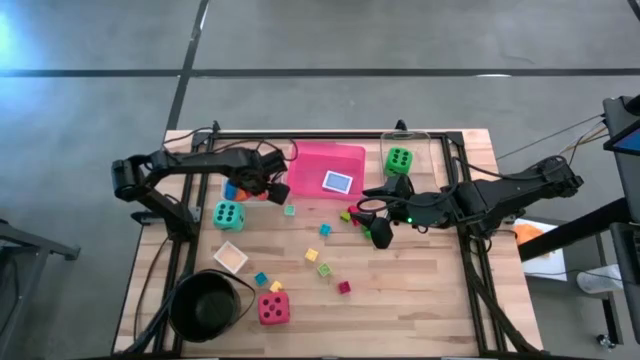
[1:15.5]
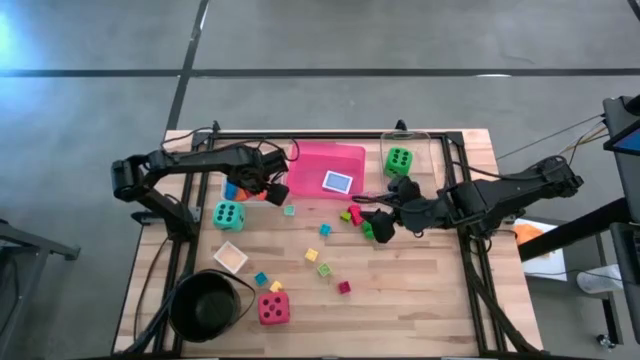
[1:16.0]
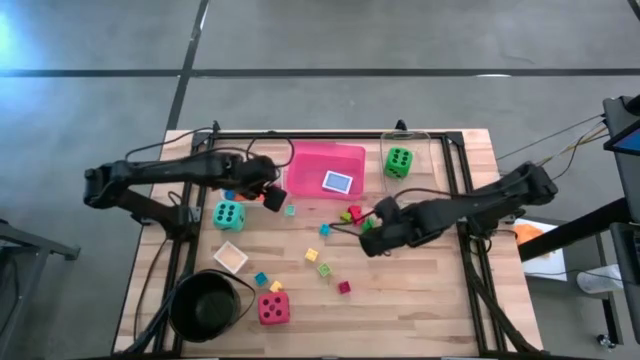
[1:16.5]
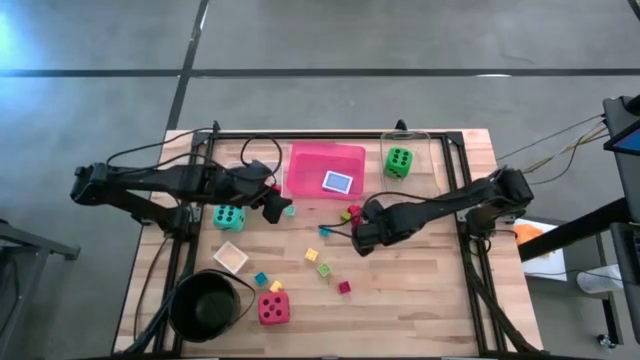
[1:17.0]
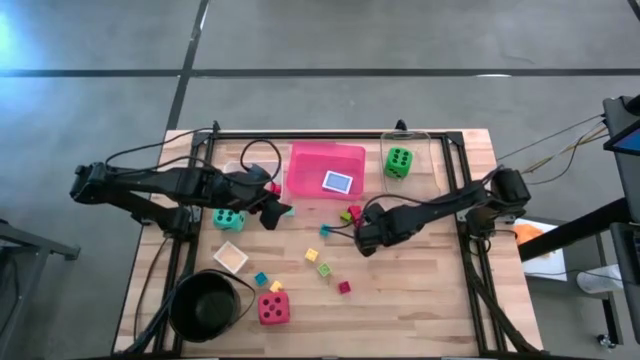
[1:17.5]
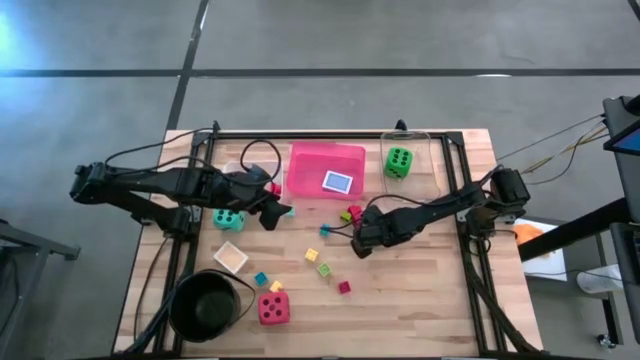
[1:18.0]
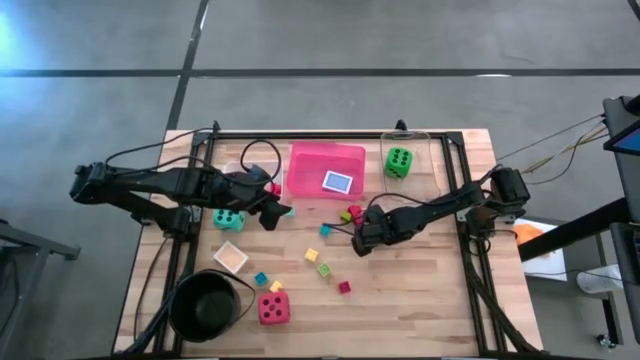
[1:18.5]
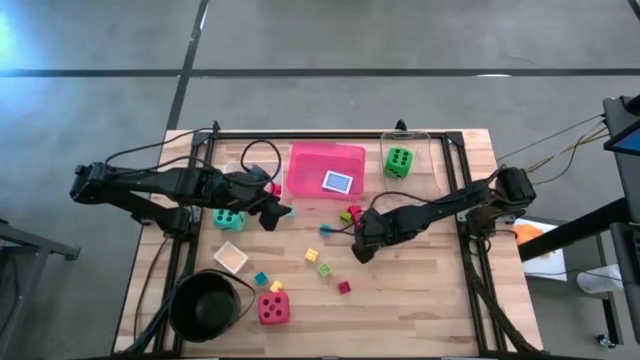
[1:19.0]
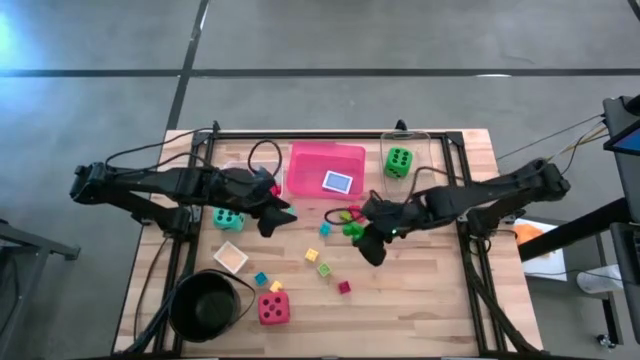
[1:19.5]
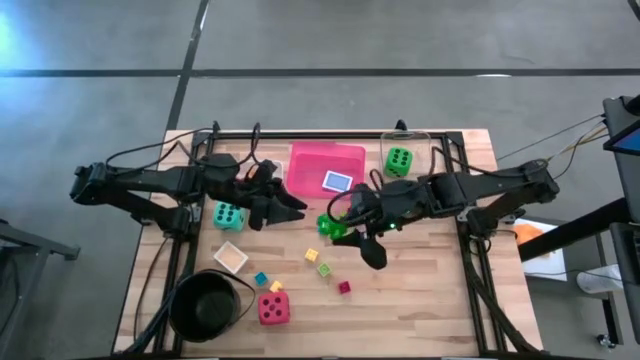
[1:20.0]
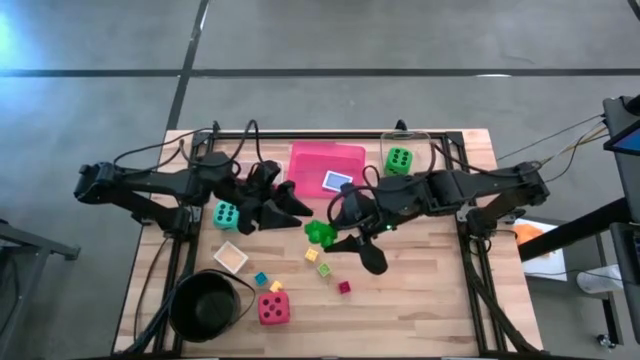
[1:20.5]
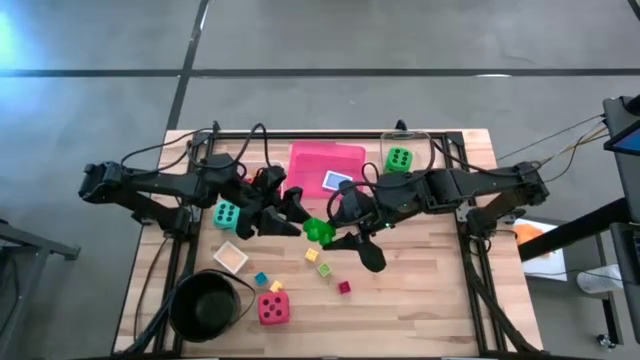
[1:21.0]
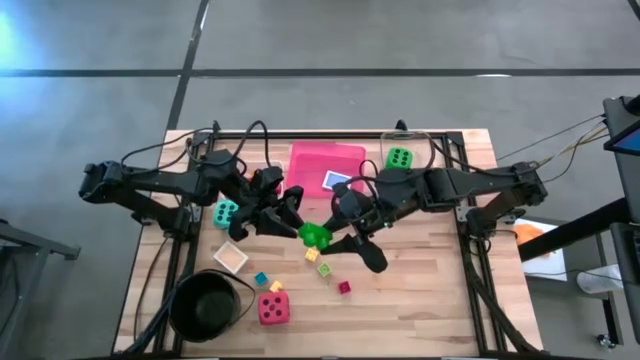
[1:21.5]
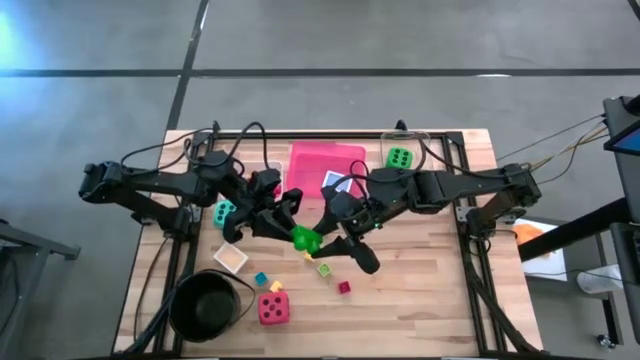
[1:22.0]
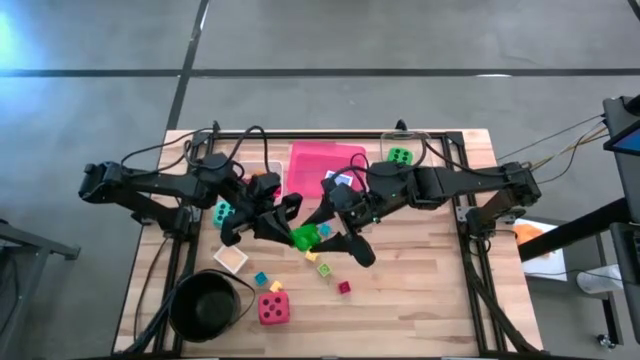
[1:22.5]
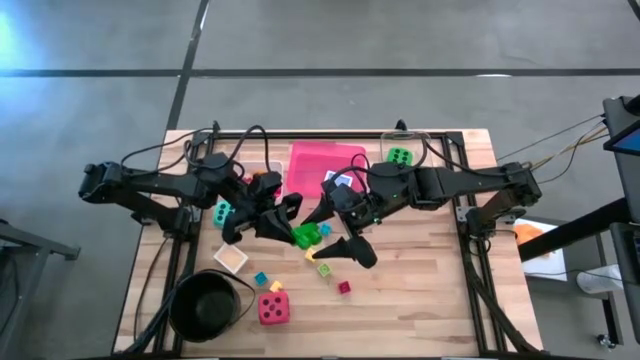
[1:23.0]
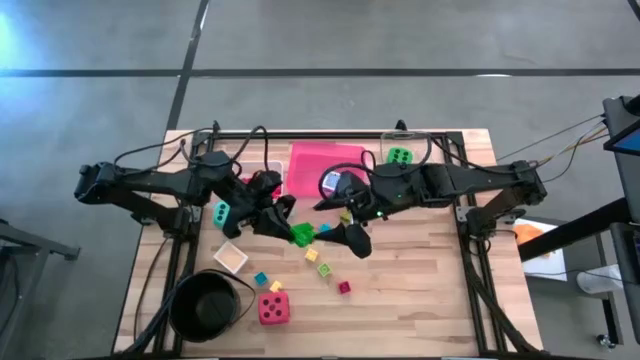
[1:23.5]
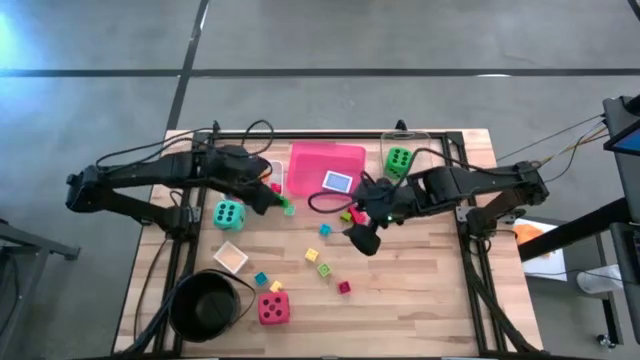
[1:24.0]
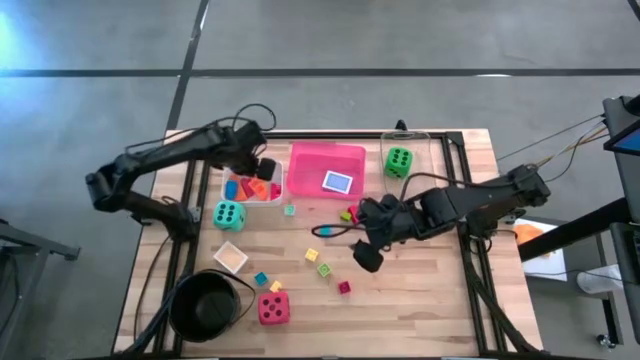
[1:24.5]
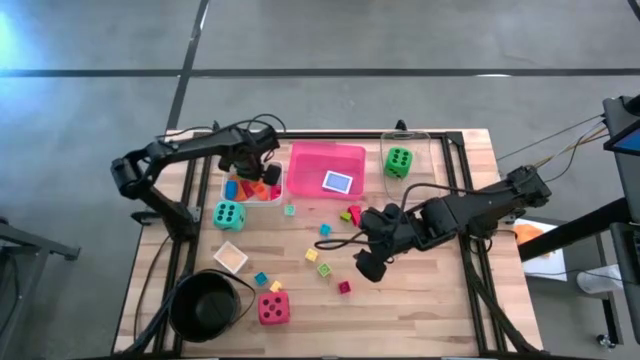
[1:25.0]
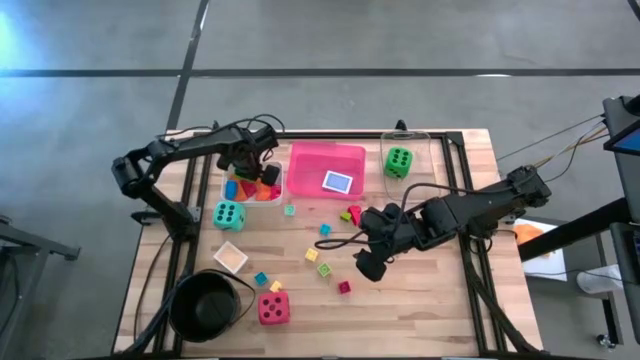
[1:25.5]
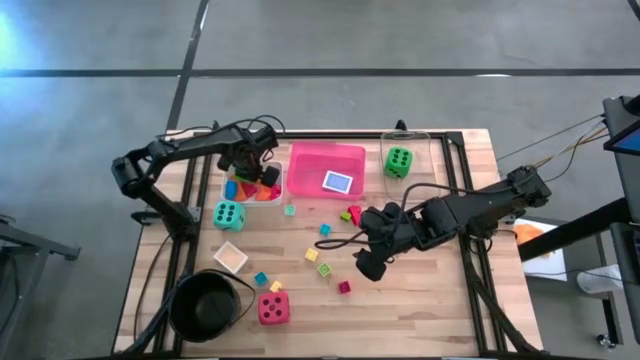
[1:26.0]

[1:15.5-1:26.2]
Task: Pick & Place Toys
Put the green game piece into the white bin

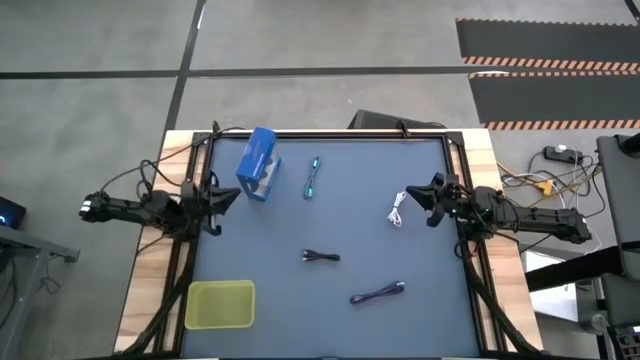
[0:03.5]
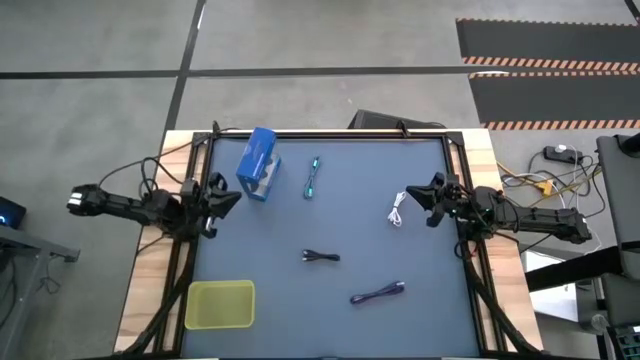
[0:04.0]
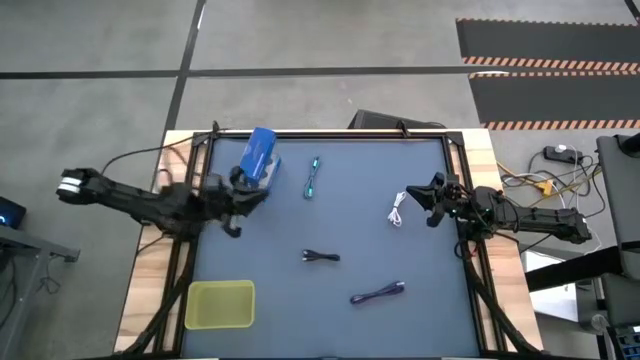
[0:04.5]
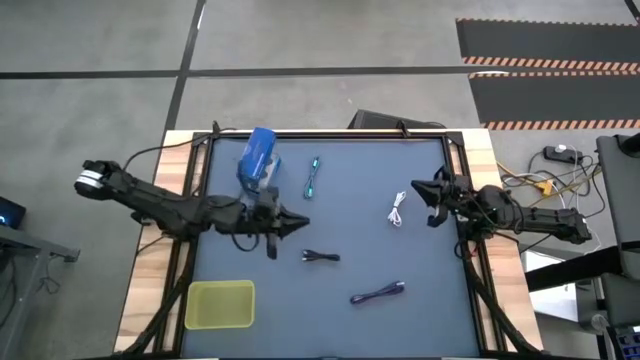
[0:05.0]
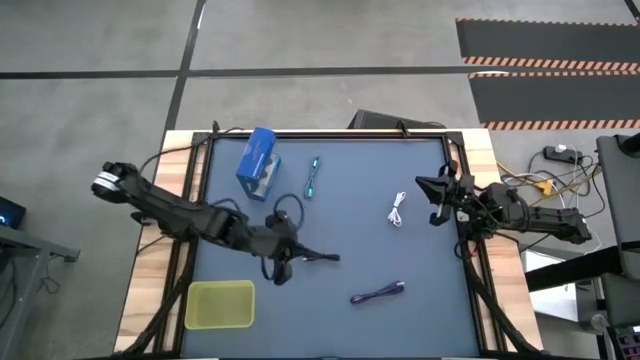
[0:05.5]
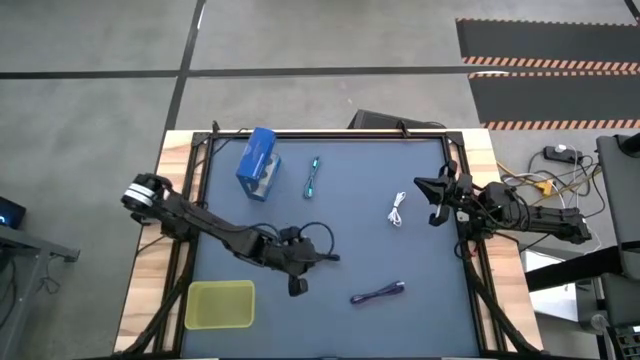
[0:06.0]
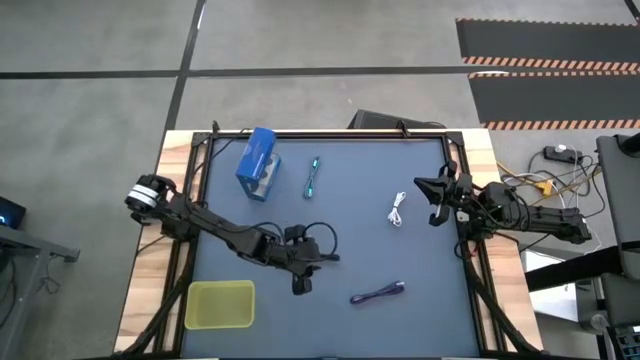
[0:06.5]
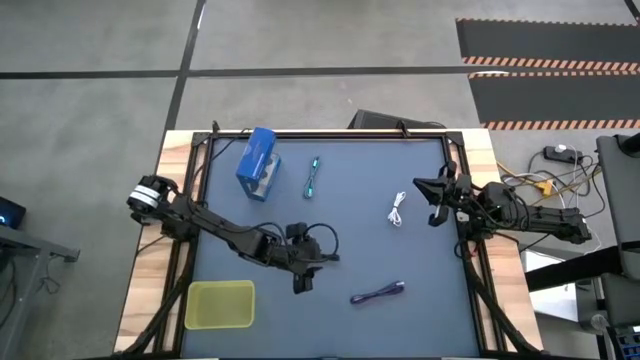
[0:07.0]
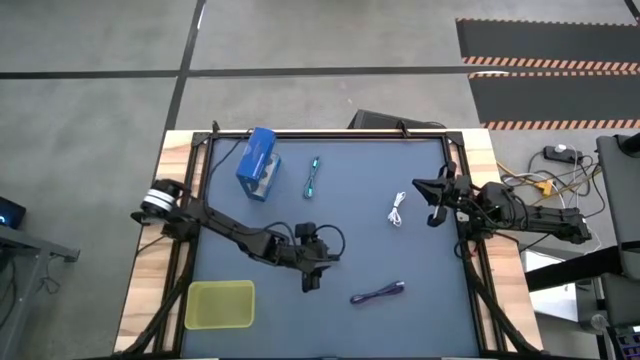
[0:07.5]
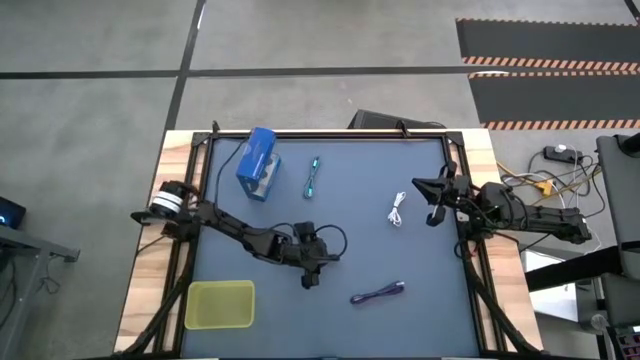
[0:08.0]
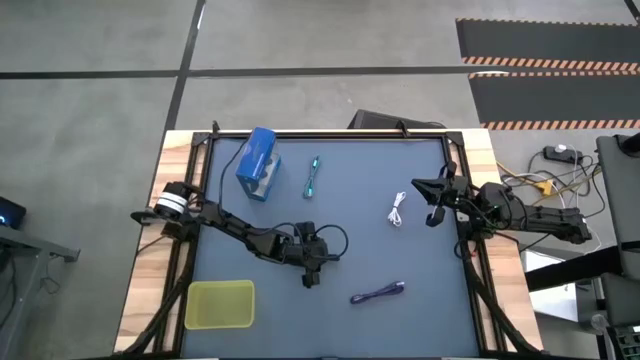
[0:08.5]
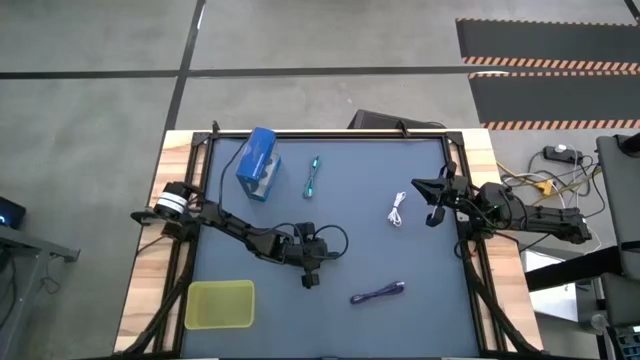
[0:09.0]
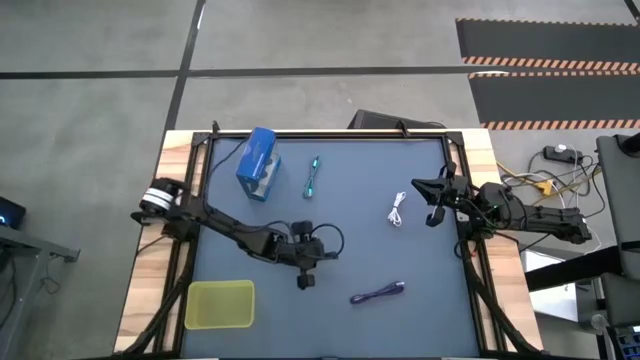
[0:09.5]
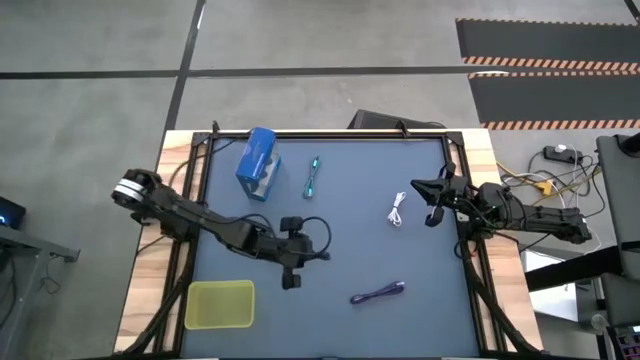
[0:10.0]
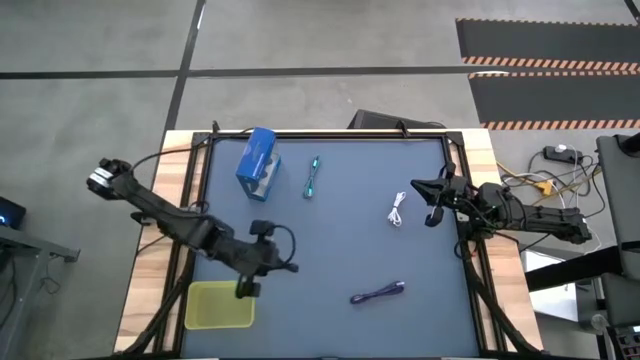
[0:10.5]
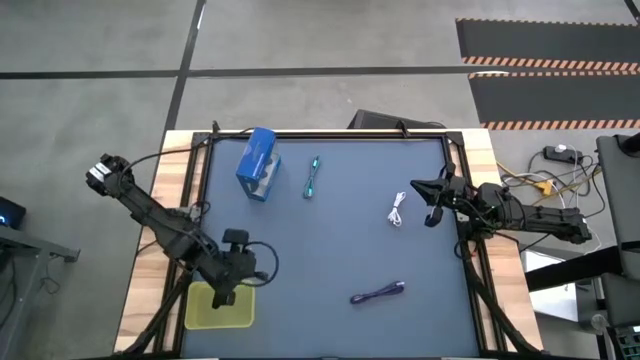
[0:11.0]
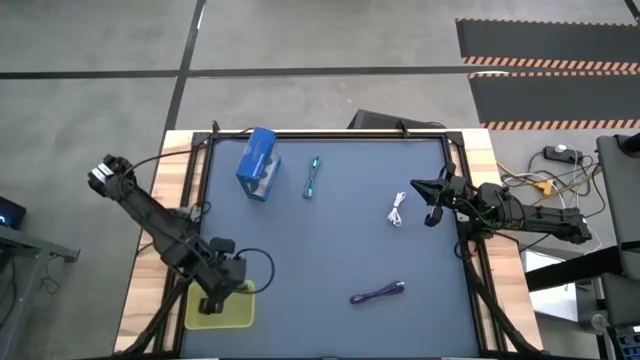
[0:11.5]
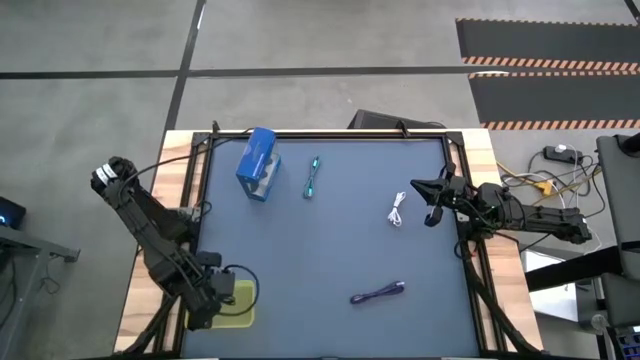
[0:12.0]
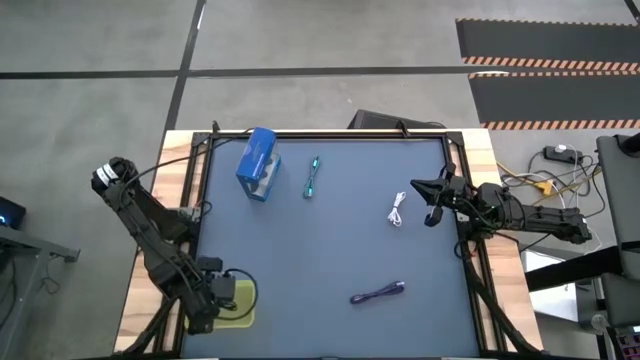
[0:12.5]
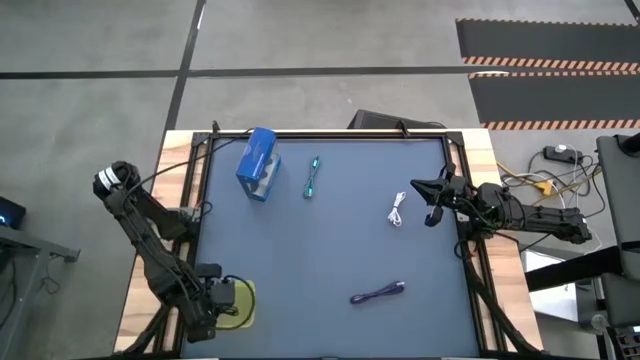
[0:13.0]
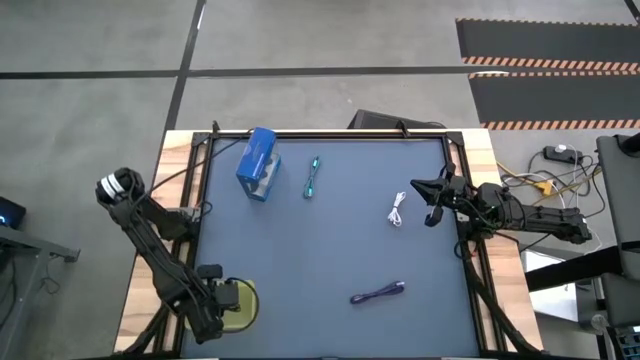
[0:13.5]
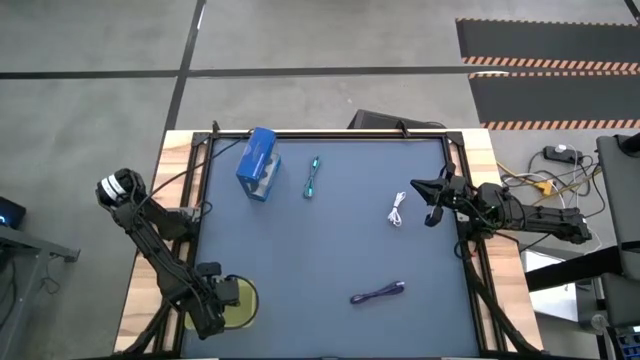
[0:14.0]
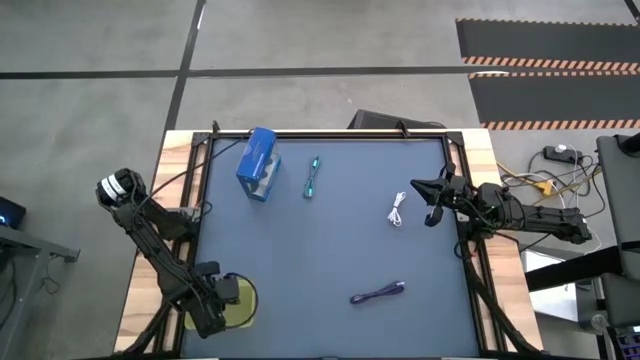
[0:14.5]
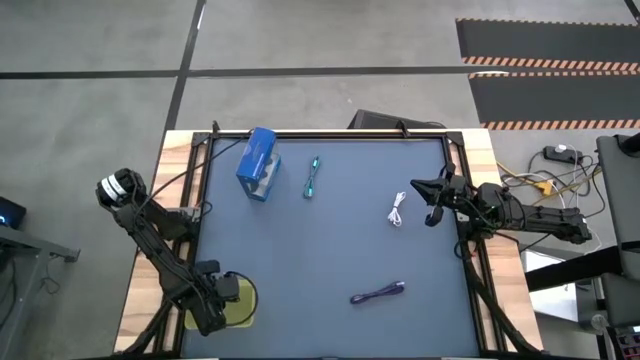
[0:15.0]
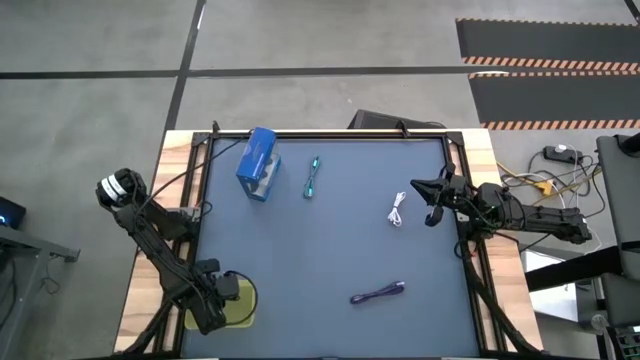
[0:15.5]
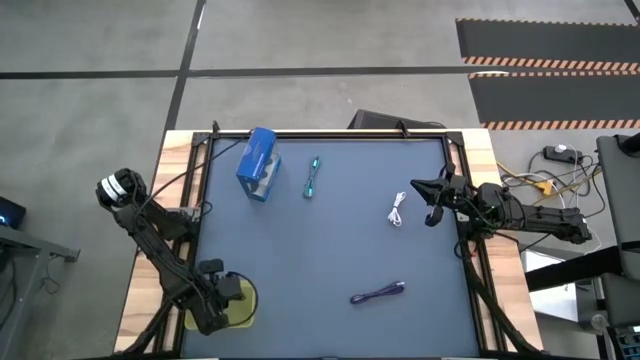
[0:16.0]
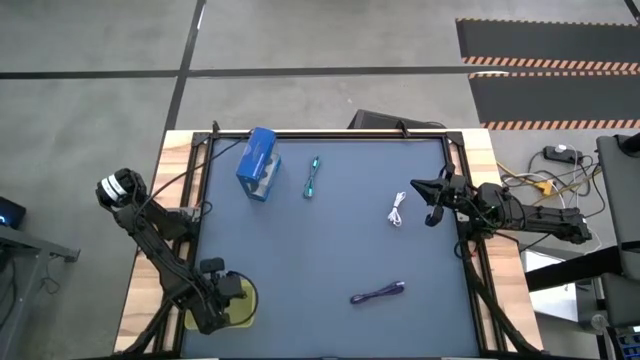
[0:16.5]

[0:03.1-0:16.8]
Task: Pick and place USB-C Cables
Put the black charger cable into the yellow bin
